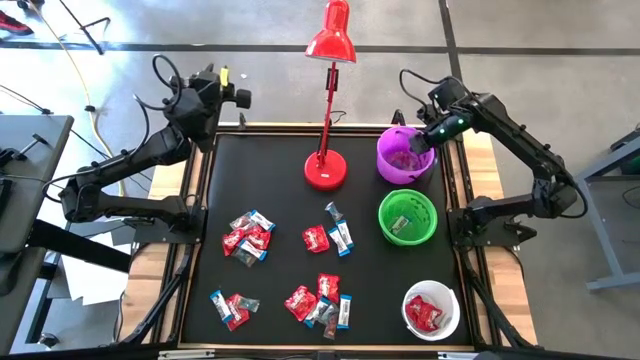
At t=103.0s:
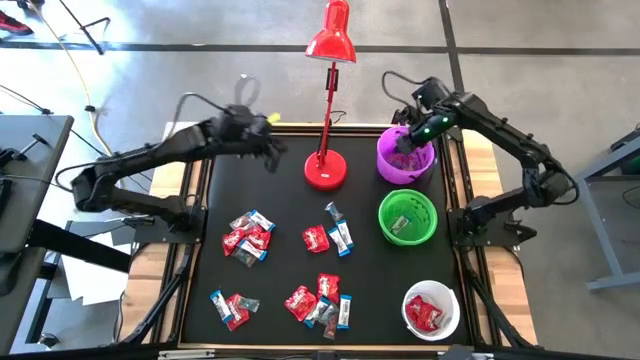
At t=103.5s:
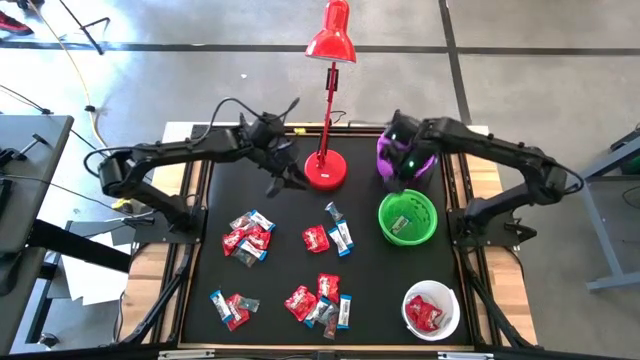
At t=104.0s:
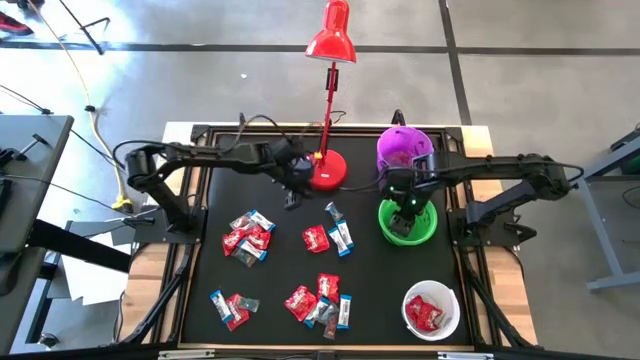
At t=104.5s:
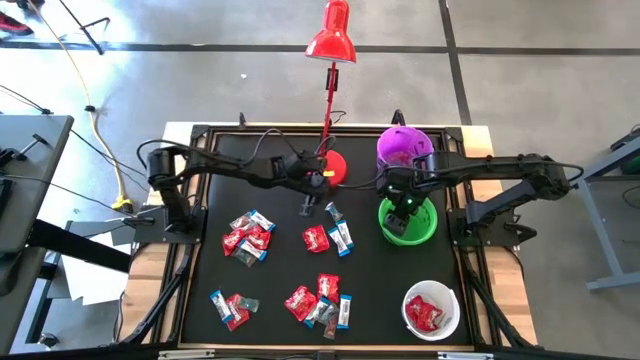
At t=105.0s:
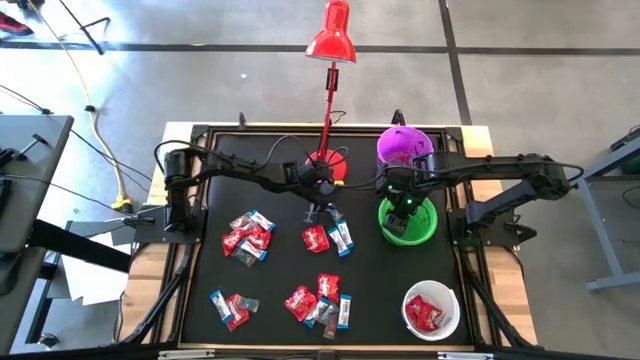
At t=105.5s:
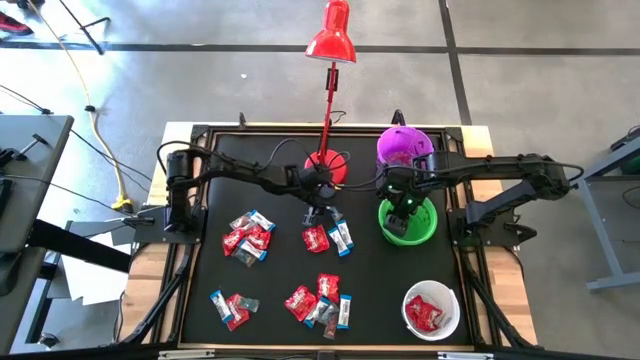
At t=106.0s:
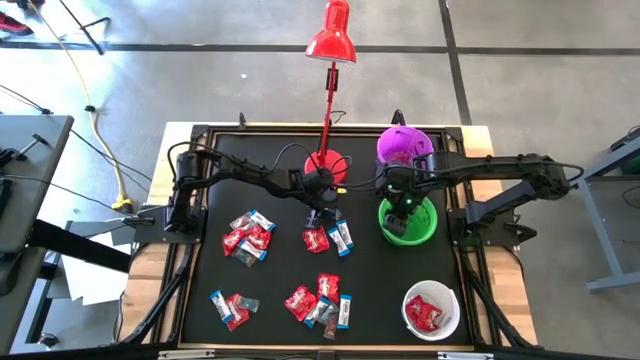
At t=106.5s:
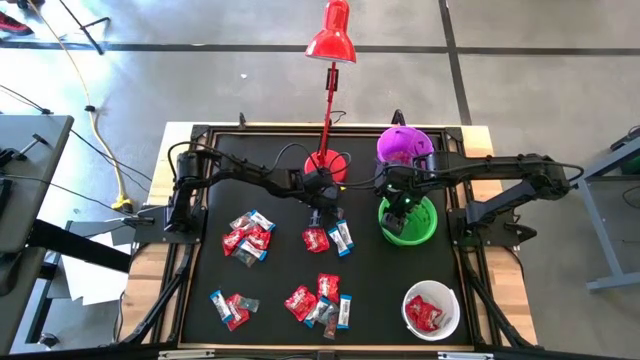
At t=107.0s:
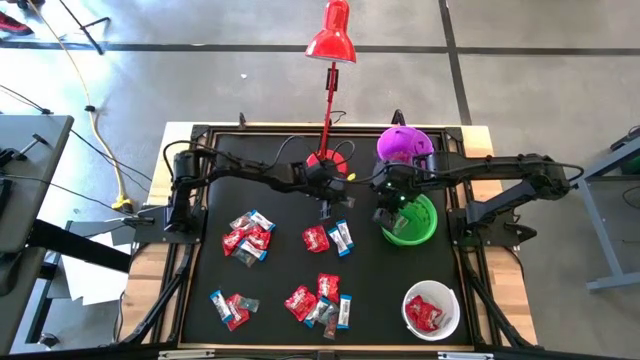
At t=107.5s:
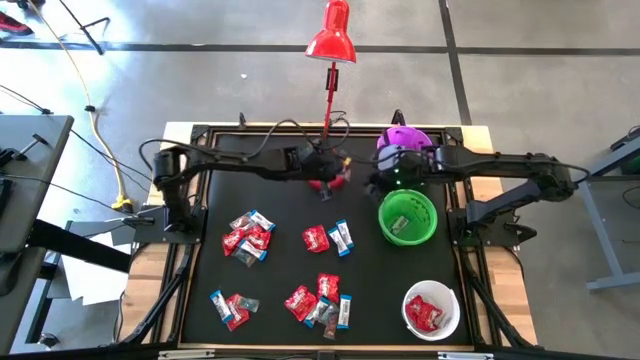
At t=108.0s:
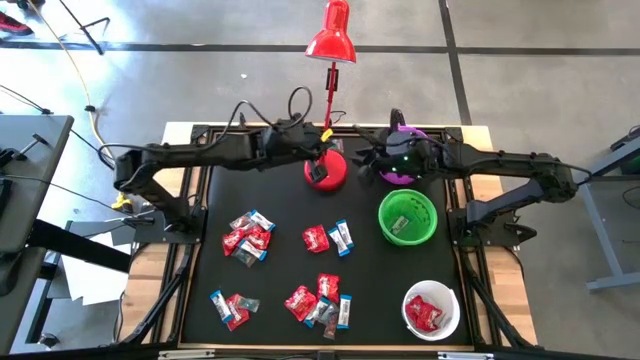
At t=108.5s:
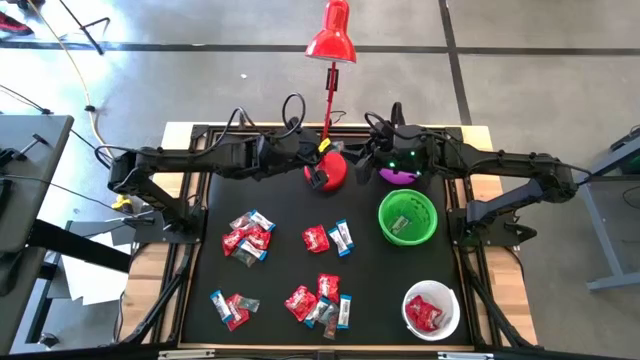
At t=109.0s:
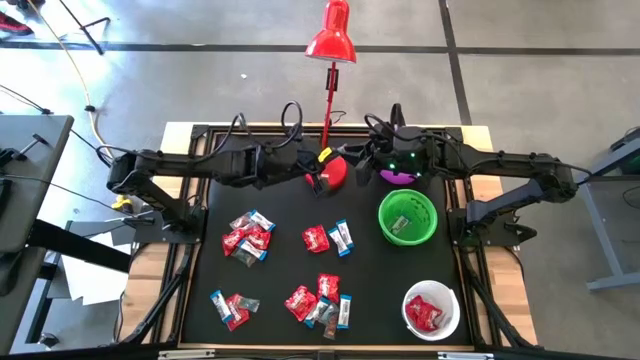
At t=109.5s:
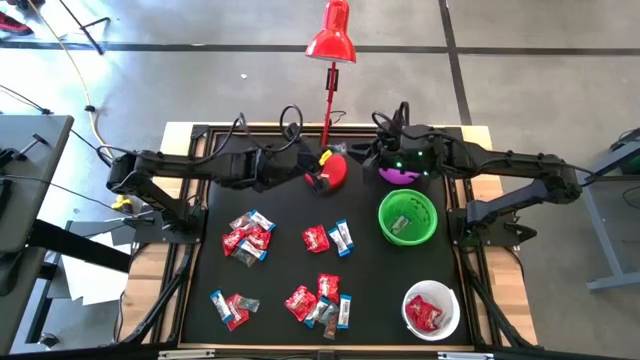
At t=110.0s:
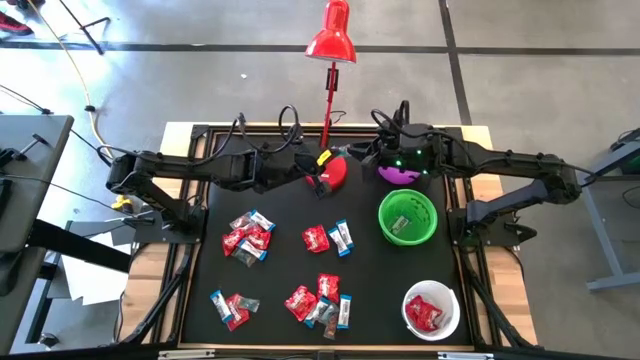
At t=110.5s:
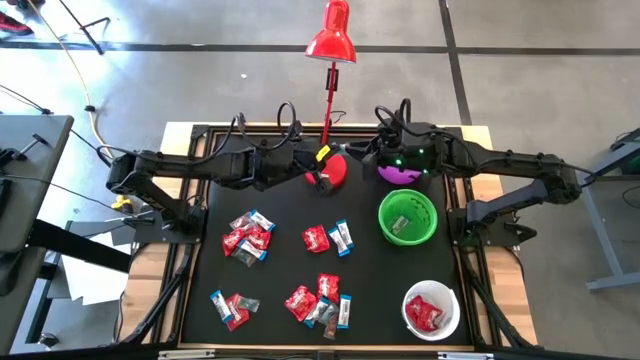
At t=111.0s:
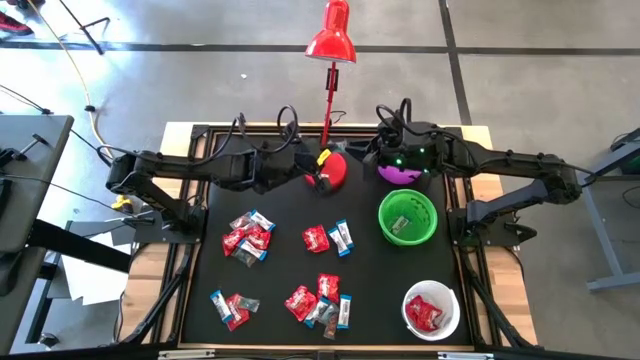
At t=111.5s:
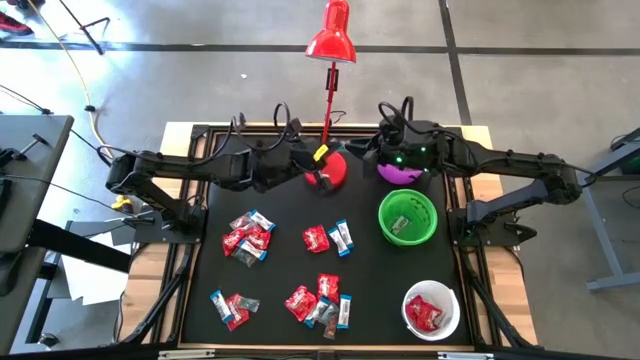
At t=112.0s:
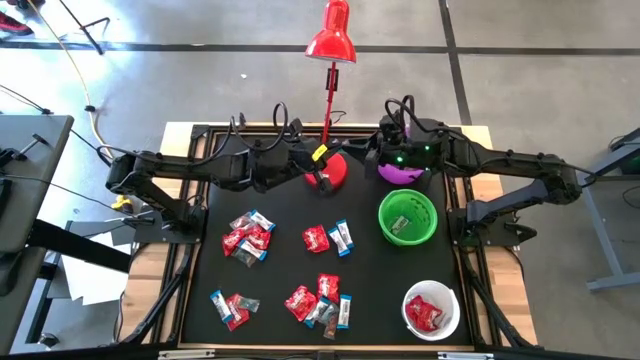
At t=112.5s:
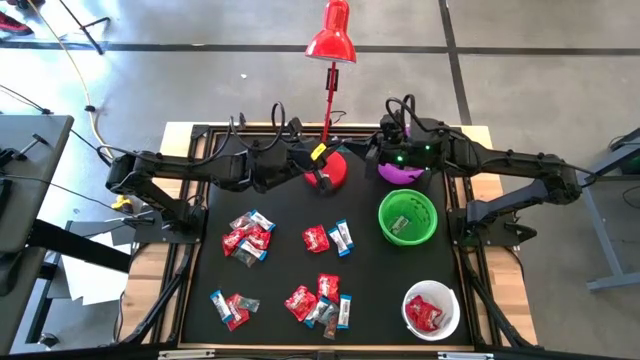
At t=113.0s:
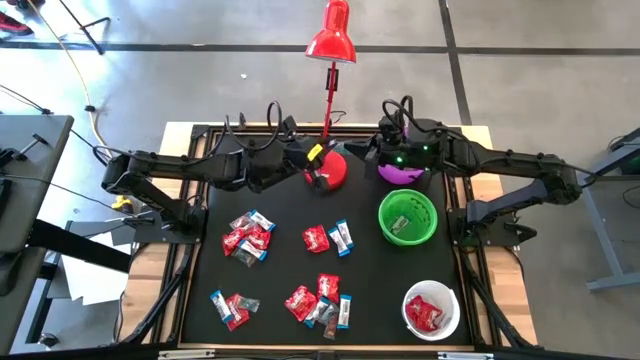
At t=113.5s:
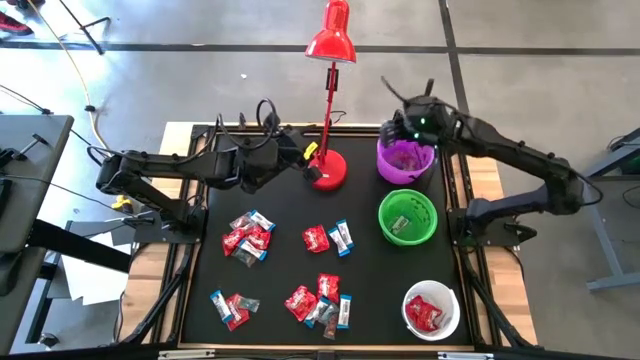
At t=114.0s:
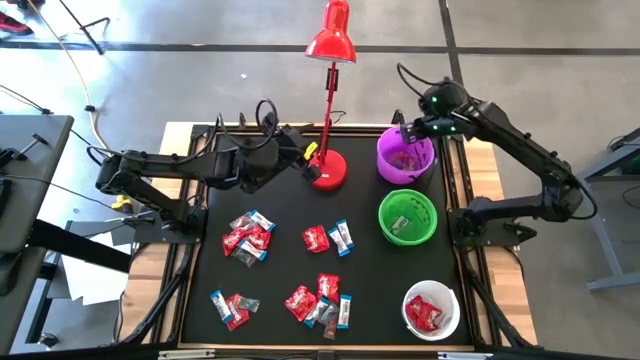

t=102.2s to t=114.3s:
Task: Organize candy in baskets
Put the blue gummy into the violet bucket

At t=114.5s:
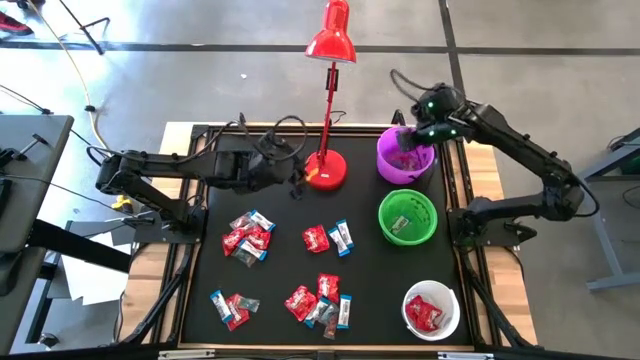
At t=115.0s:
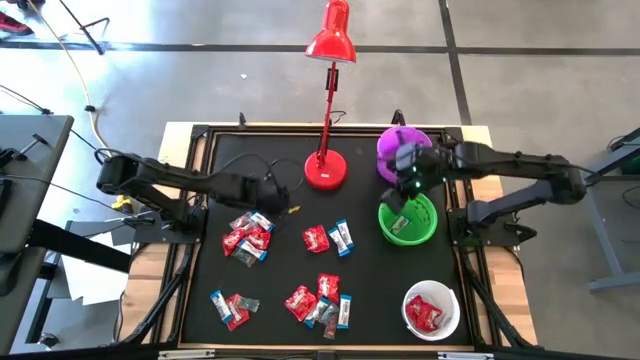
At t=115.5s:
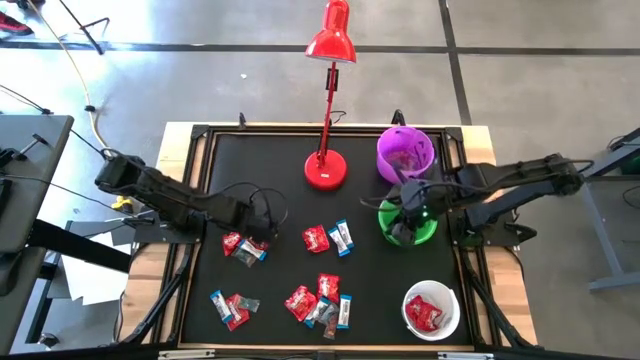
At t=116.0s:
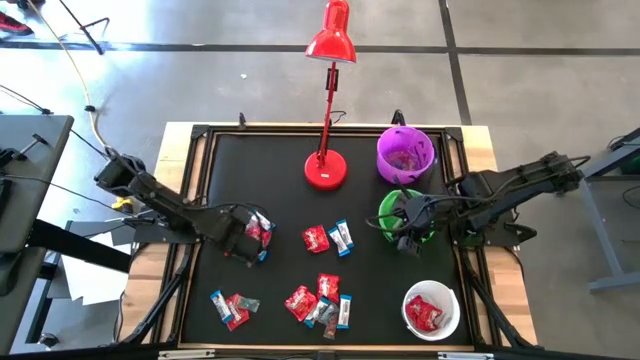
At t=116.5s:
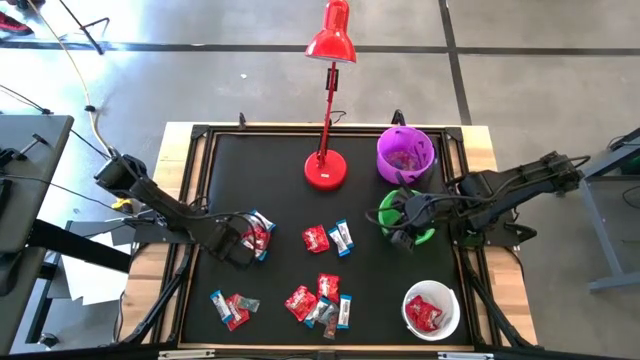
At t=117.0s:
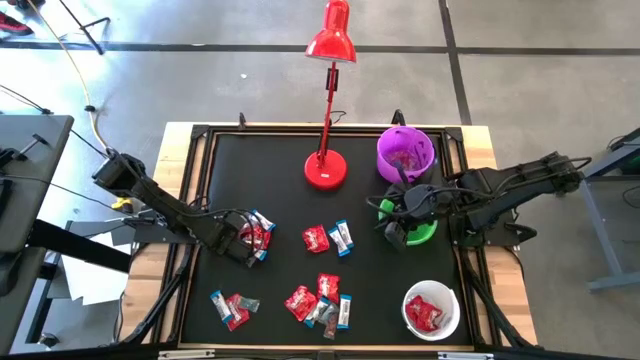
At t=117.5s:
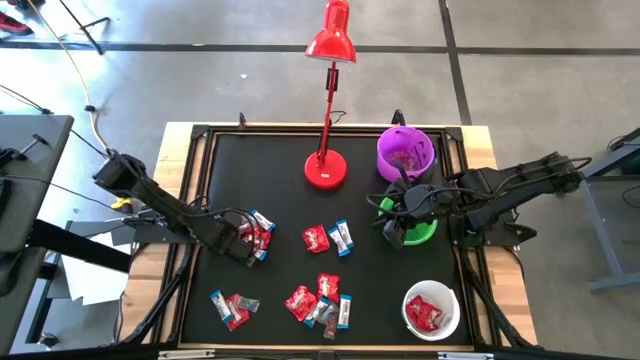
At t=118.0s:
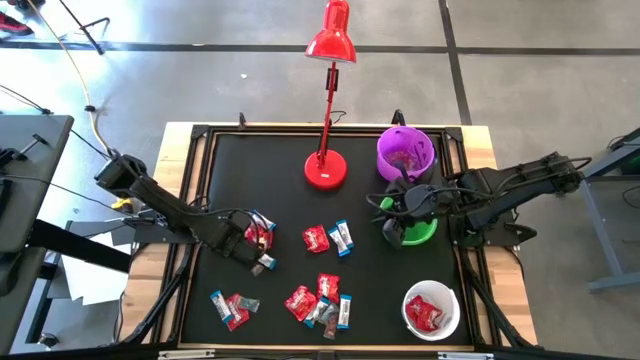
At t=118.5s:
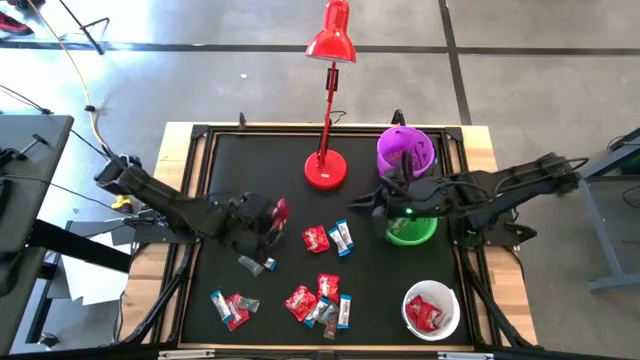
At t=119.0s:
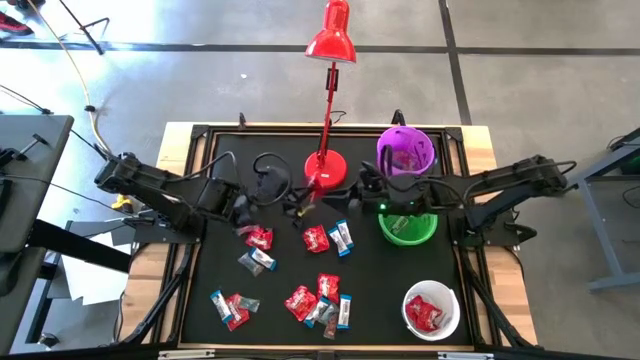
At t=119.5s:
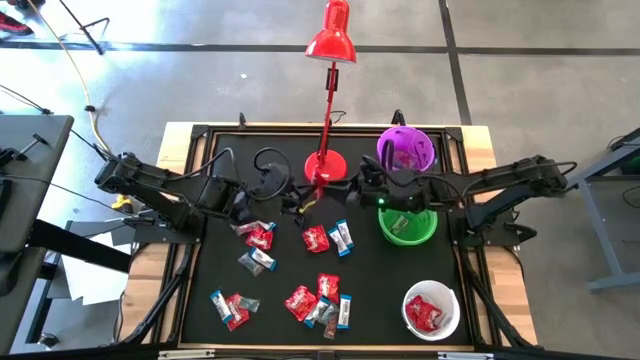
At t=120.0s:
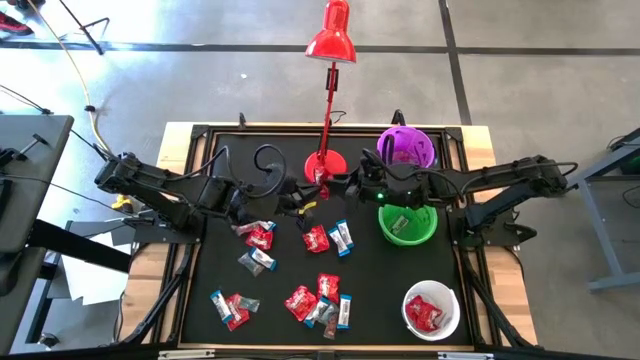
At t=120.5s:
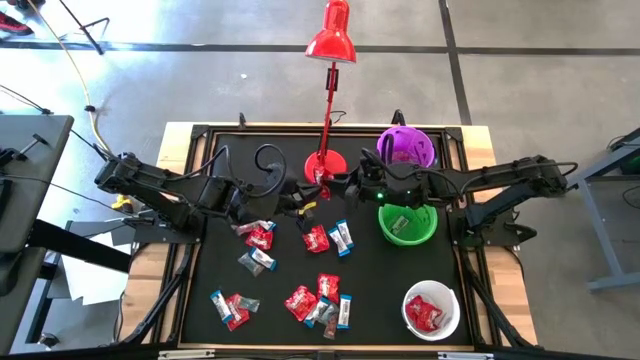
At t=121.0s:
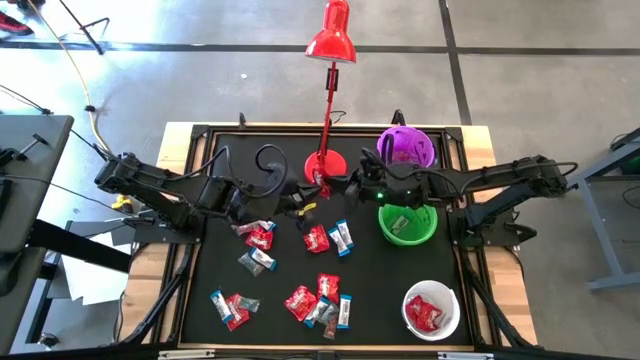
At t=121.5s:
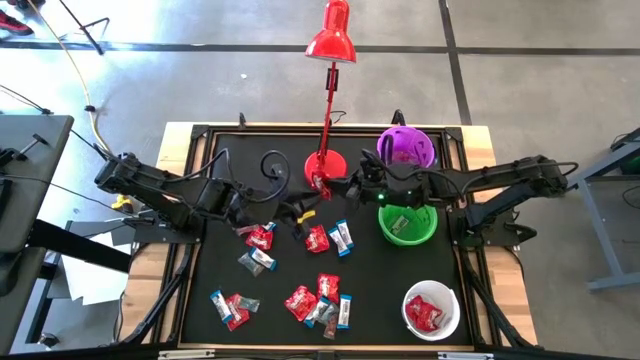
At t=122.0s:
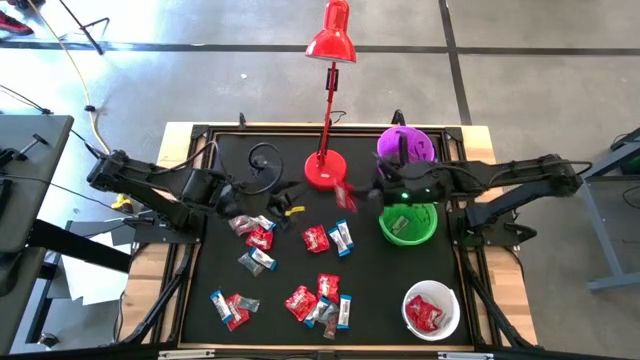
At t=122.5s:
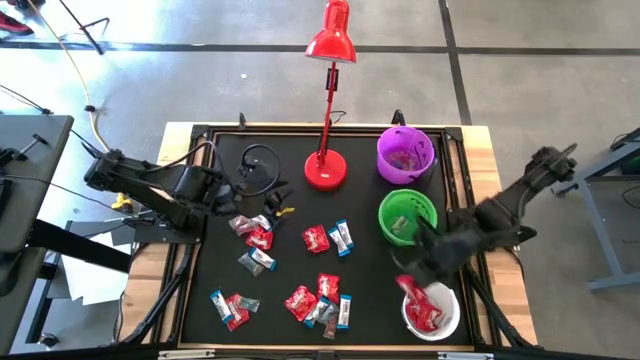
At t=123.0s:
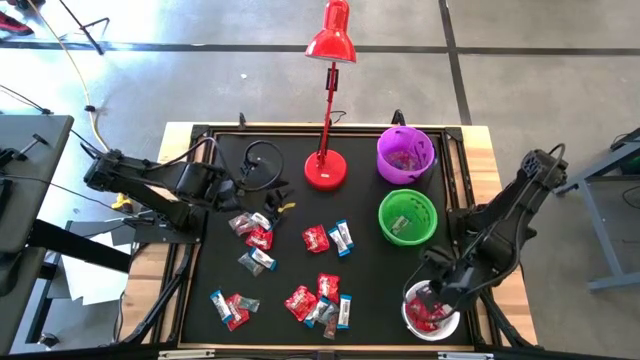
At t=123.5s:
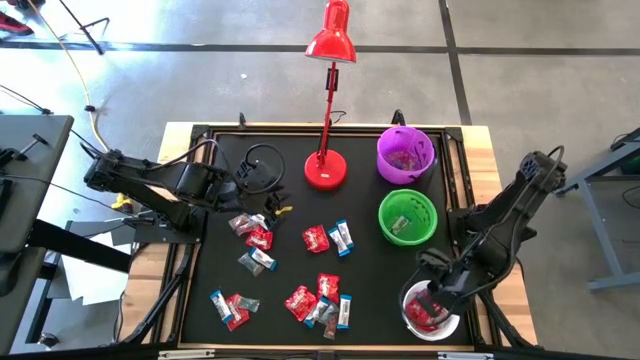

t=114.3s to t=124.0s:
Put the red candy into the white bucket

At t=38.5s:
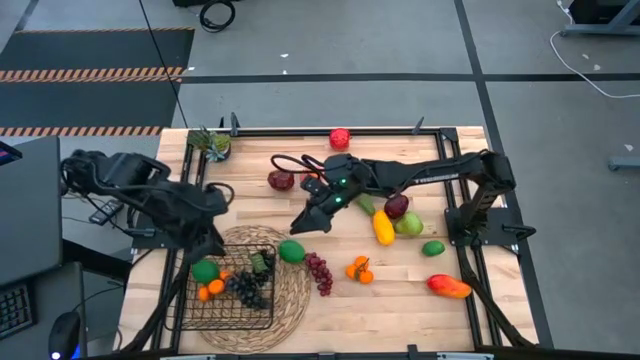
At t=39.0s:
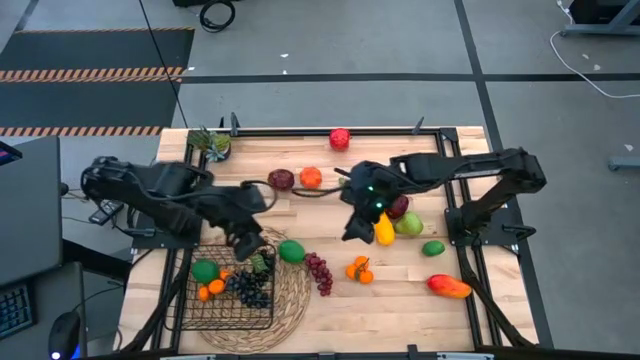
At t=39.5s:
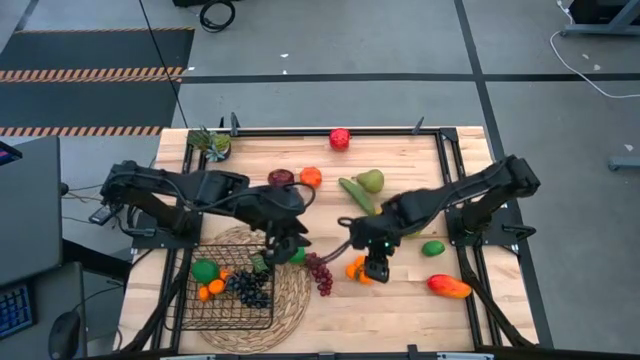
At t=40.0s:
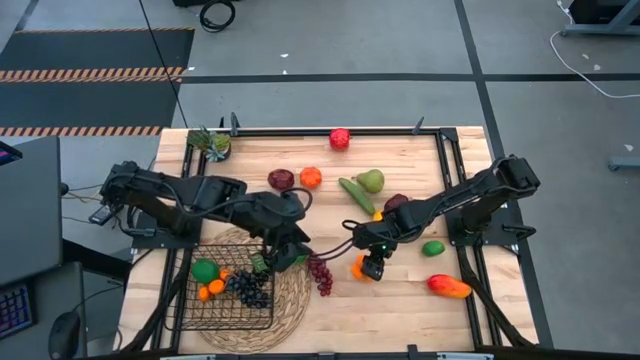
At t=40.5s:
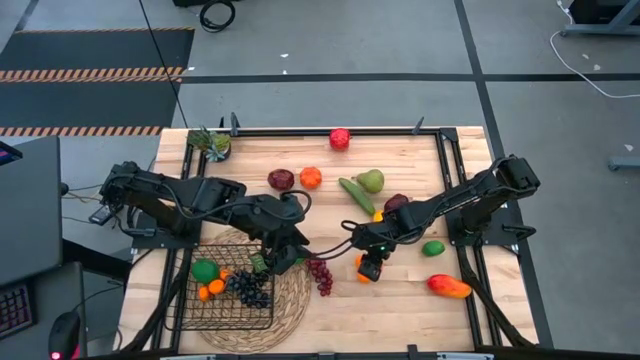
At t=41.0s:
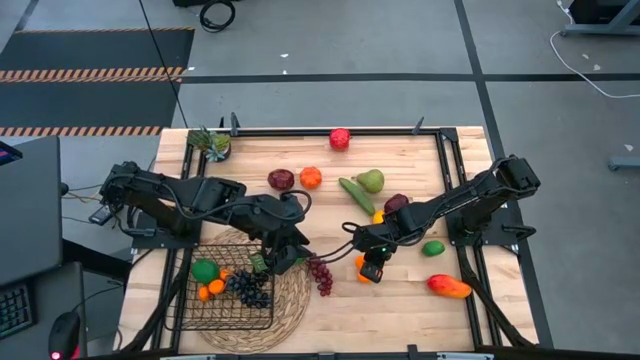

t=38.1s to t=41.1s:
Task: Build produce basket
Put the tangerine into the black wire basket
